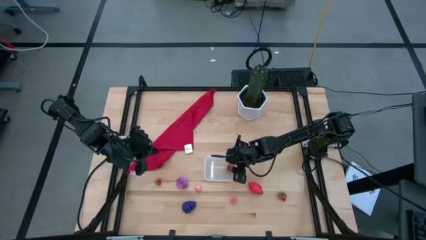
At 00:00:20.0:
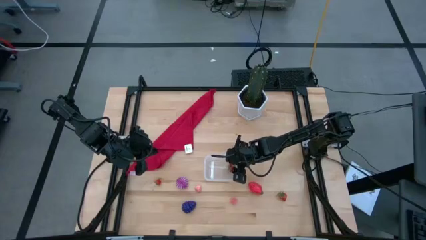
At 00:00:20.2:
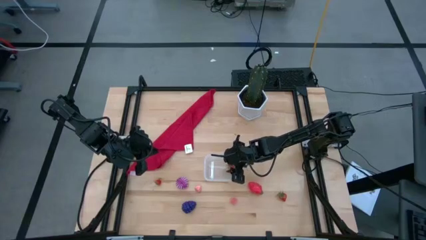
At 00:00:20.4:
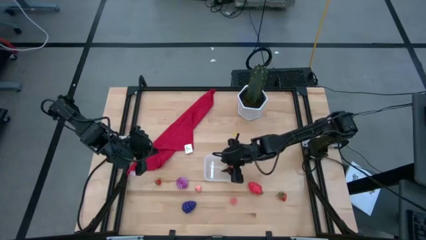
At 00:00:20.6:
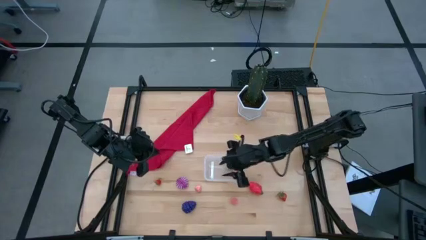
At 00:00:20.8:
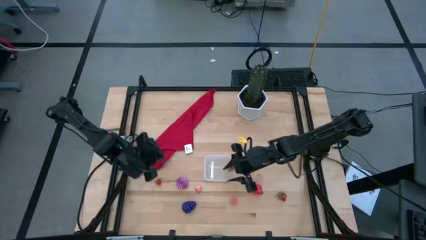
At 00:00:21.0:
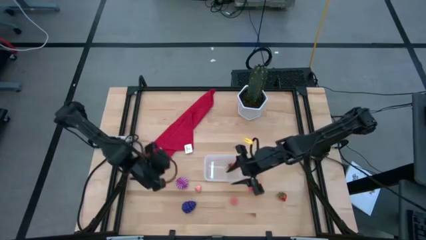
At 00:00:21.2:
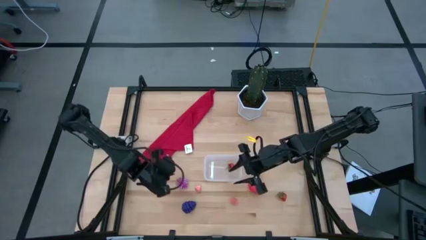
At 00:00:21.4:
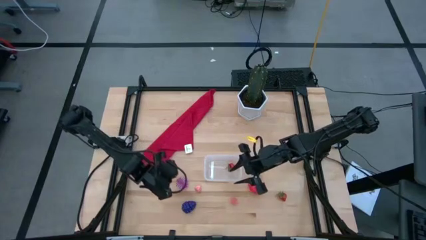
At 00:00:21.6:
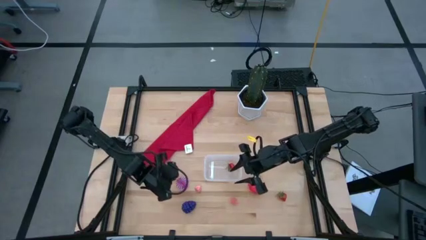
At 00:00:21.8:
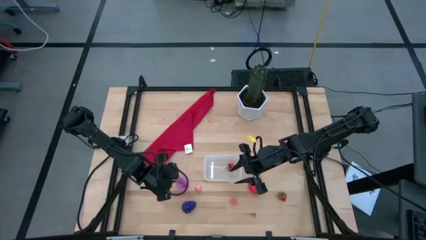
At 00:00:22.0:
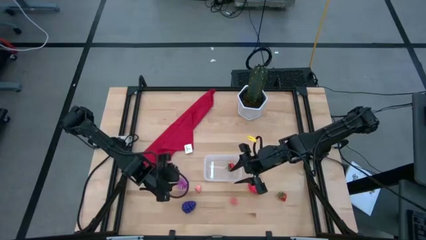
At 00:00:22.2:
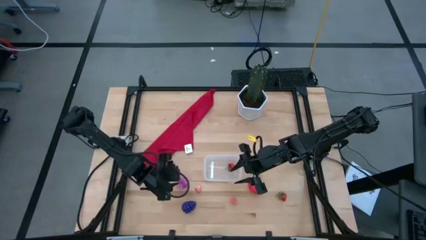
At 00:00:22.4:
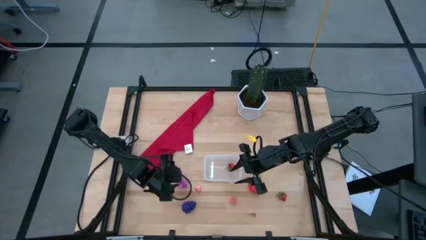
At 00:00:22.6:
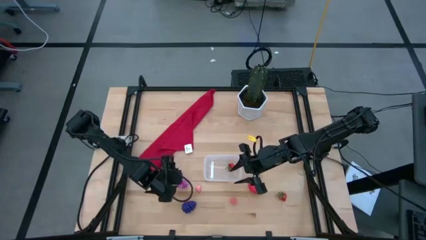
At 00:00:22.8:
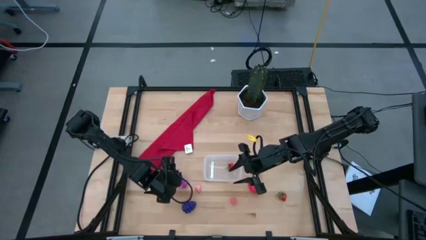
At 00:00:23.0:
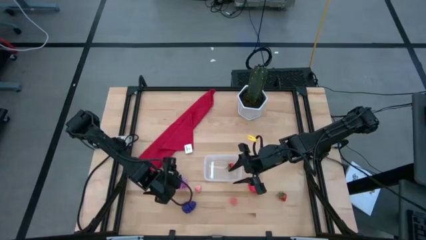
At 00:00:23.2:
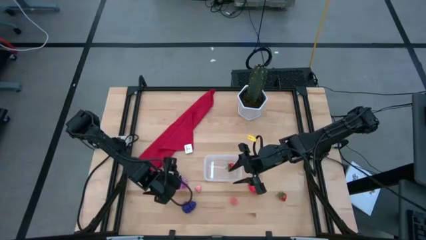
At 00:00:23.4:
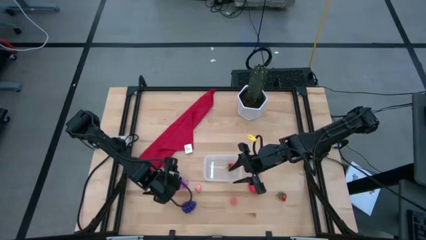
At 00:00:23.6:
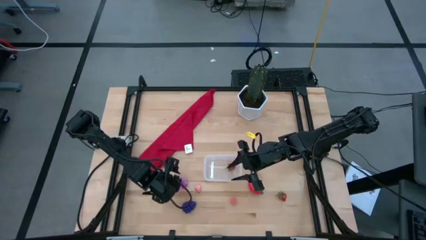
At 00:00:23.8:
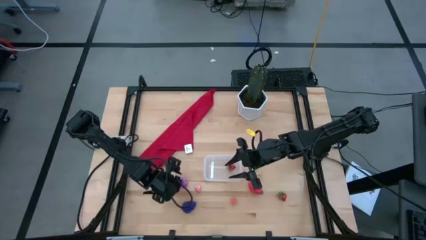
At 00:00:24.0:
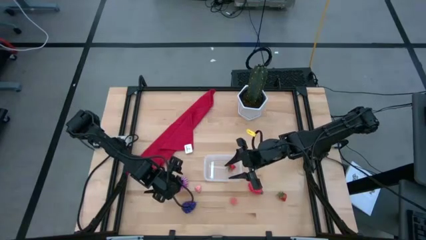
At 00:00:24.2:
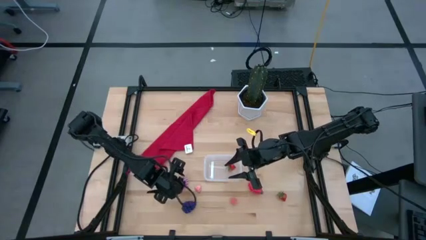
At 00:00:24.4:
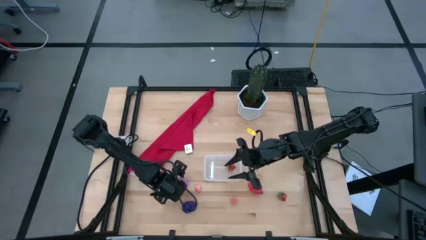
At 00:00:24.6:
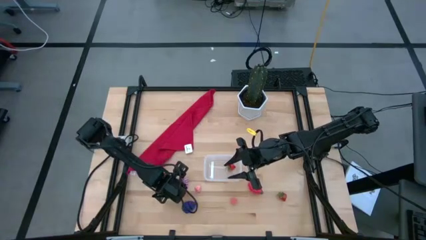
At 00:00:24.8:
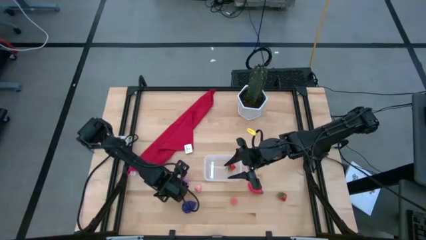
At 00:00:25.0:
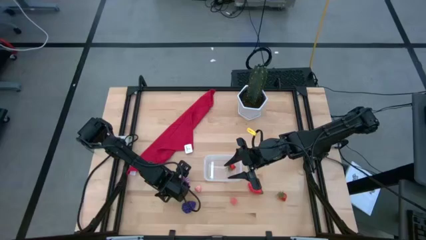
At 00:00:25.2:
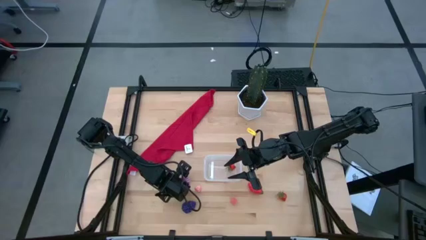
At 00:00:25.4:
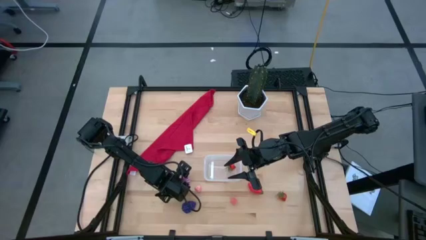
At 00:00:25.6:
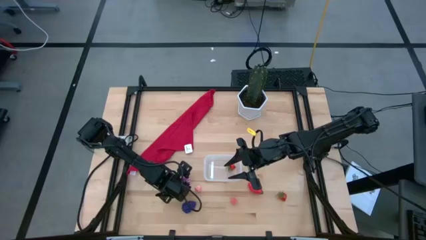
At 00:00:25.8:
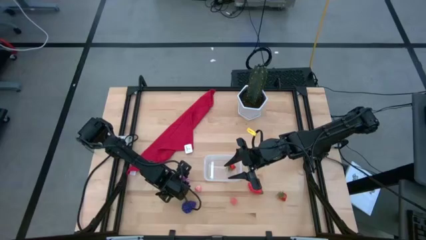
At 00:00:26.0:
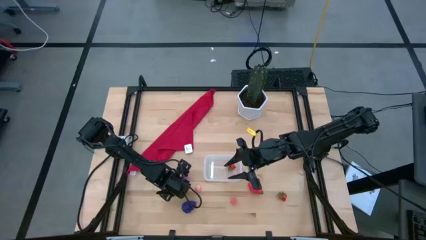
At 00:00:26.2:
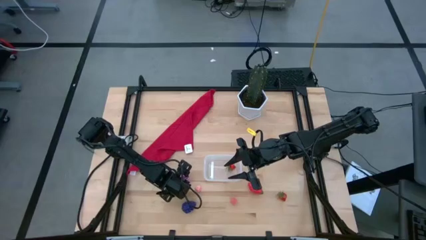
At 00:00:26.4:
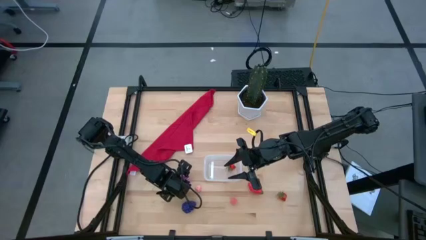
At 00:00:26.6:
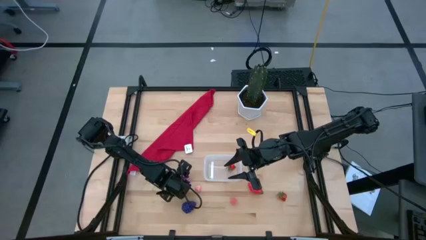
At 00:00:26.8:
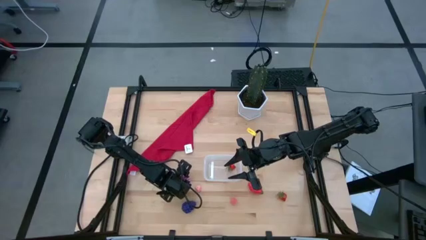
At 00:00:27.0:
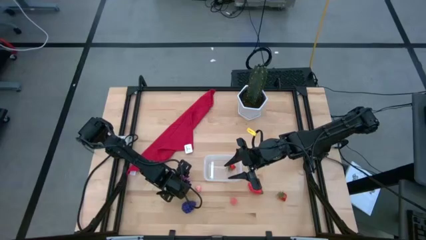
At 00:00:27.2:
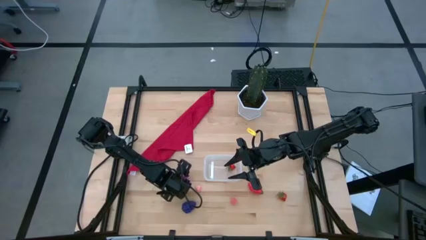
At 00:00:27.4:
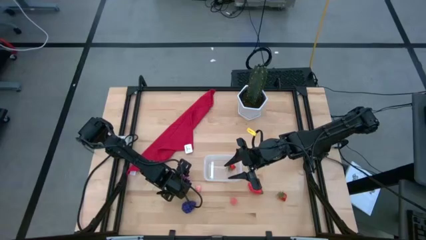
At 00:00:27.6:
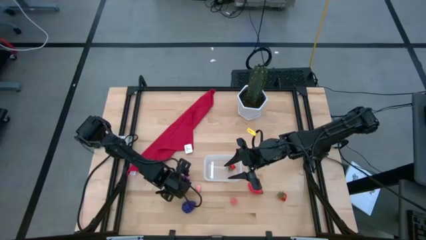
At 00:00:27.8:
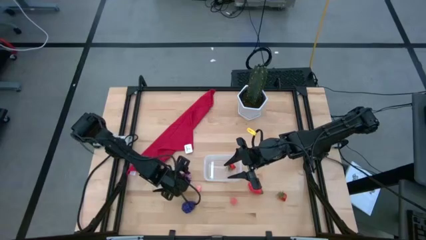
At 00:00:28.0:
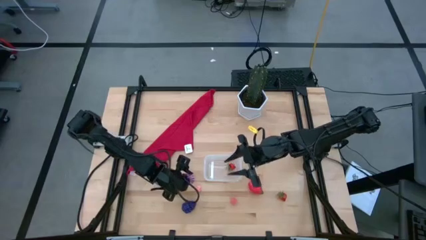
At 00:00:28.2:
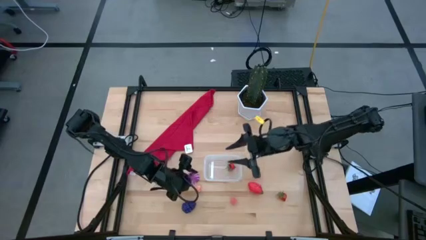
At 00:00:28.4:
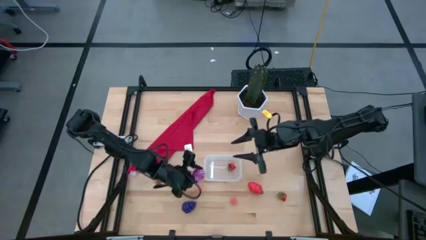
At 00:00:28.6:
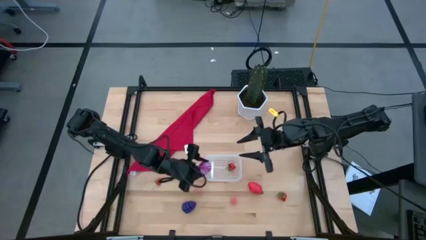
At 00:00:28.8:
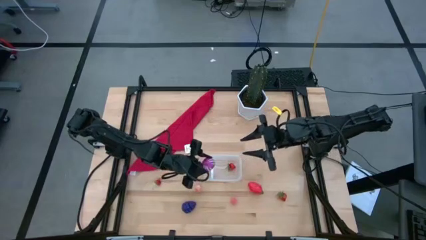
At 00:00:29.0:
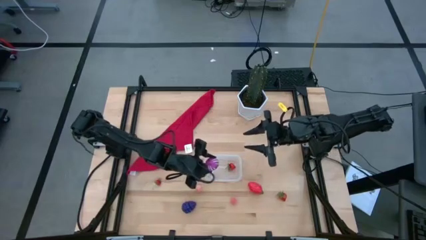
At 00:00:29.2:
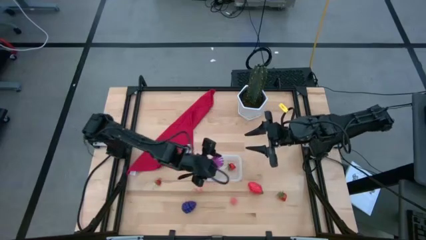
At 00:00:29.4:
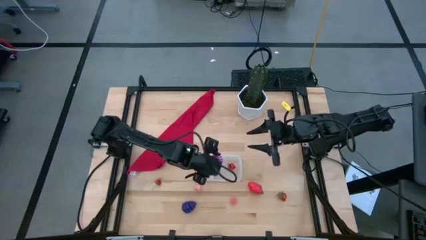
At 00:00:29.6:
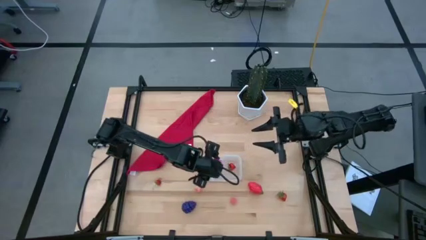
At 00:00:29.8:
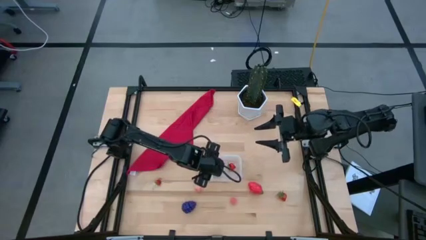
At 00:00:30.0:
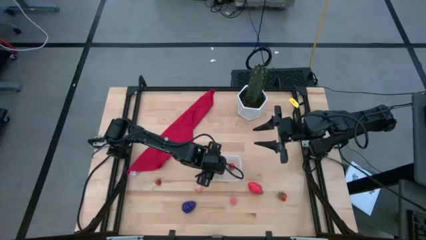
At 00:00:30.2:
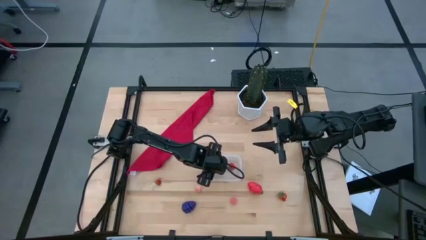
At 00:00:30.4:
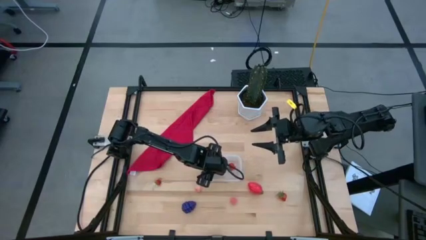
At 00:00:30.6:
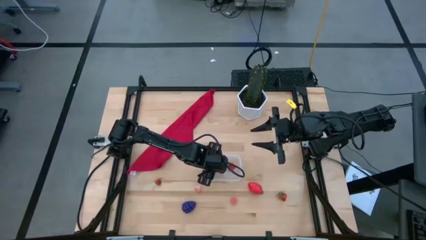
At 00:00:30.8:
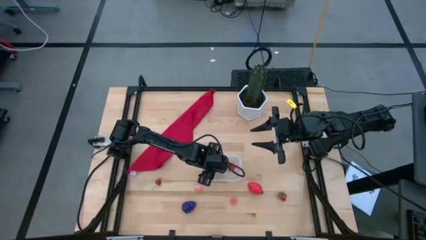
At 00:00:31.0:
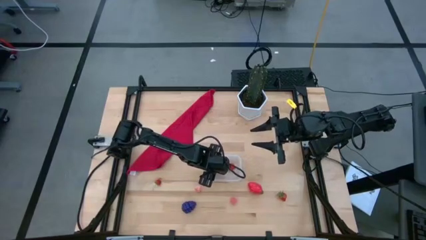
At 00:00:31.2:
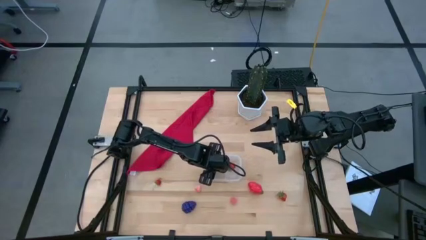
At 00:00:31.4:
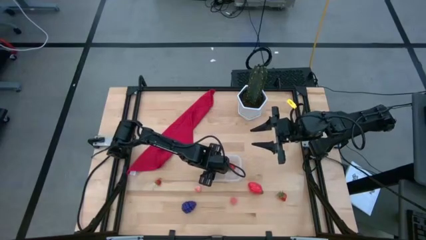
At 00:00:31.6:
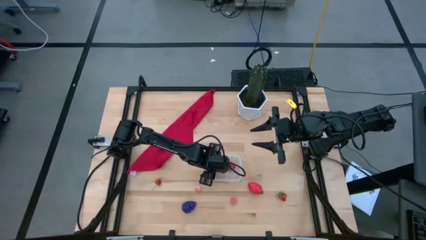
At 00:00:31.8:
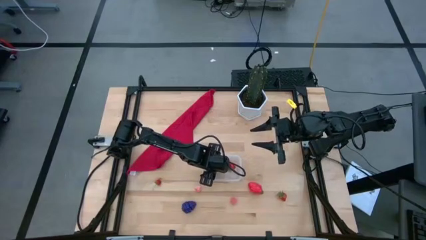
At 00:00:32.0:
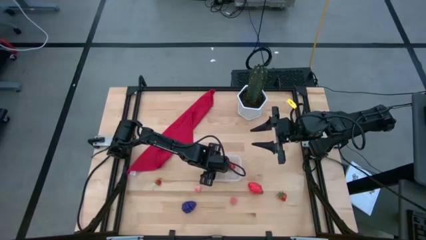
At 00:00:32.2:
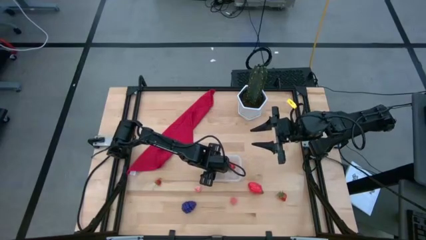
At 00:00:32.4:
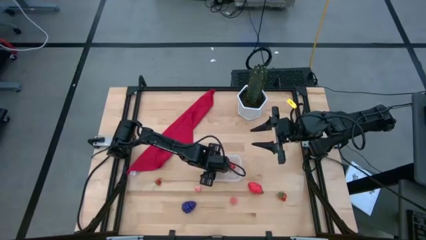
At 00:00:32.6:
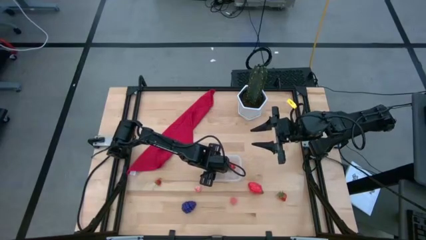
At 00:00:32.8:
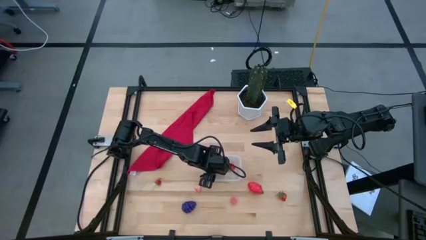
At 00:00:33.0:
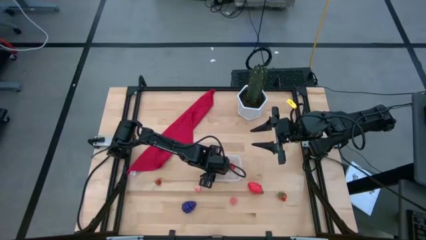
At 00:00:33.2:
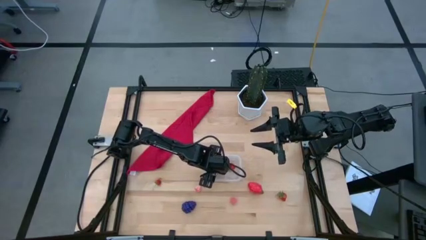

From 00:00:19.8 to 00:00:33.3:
Task: Pick and placing Produce into tupperware
Put the purple onion into the transparent bin
